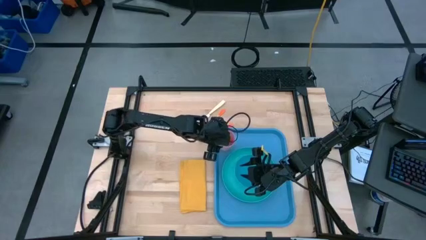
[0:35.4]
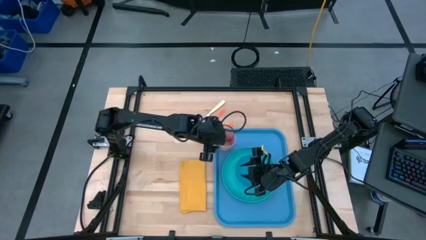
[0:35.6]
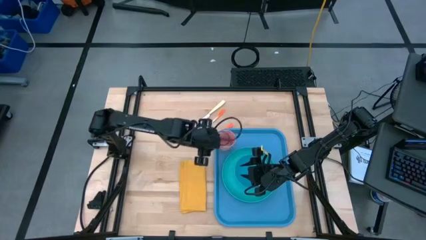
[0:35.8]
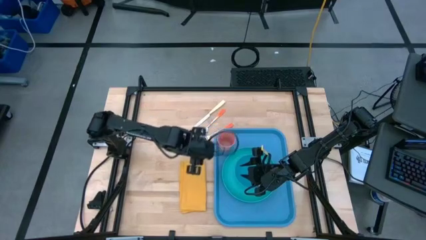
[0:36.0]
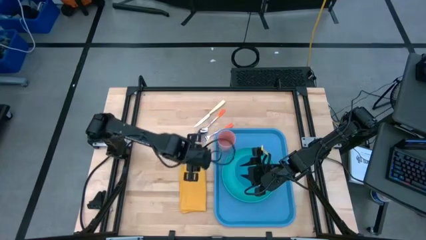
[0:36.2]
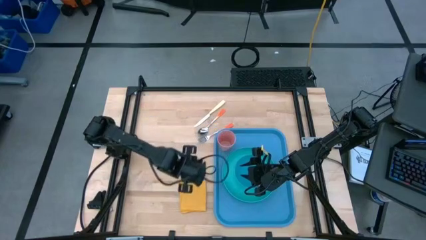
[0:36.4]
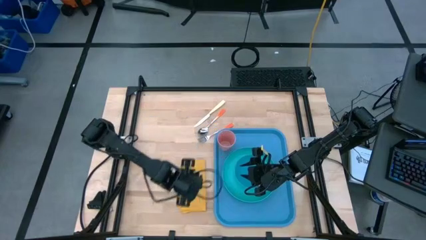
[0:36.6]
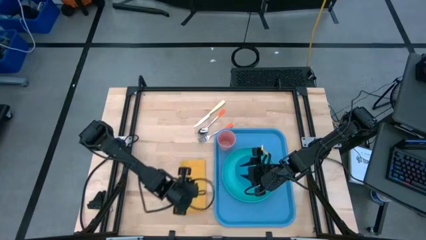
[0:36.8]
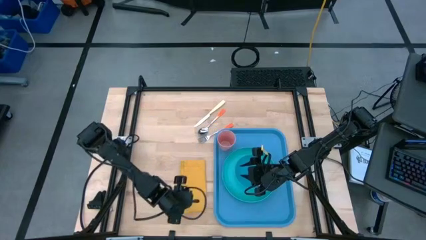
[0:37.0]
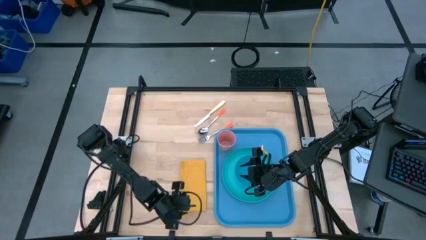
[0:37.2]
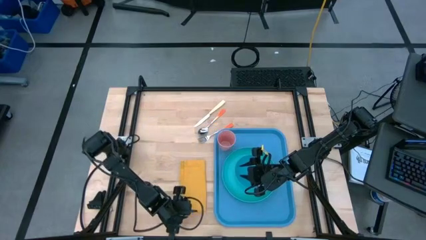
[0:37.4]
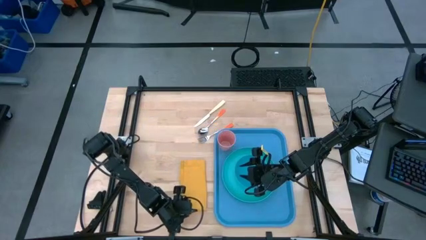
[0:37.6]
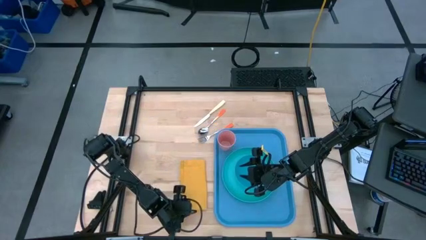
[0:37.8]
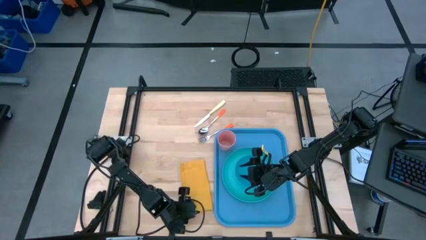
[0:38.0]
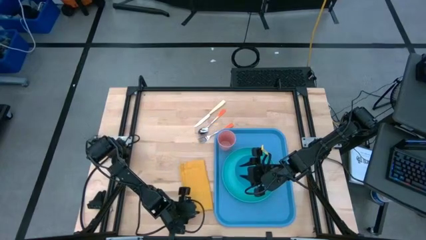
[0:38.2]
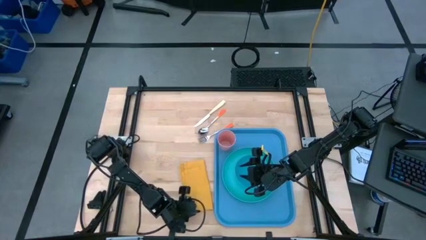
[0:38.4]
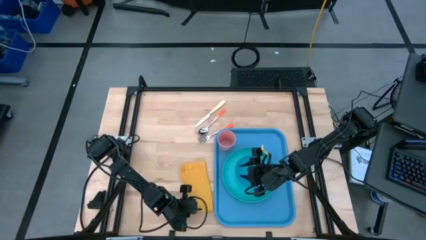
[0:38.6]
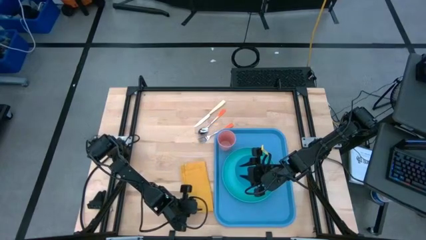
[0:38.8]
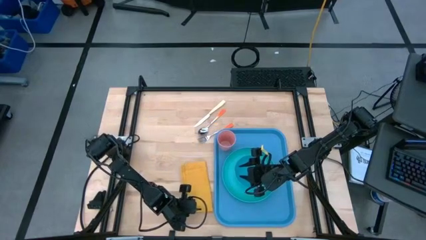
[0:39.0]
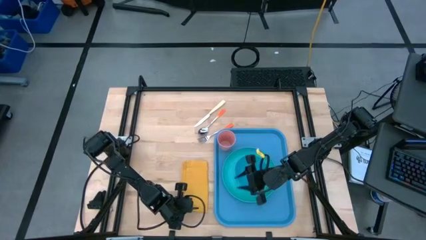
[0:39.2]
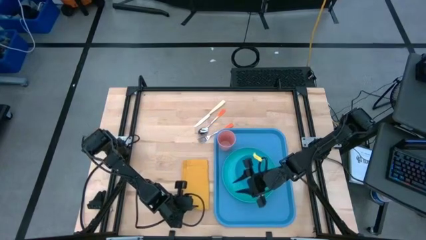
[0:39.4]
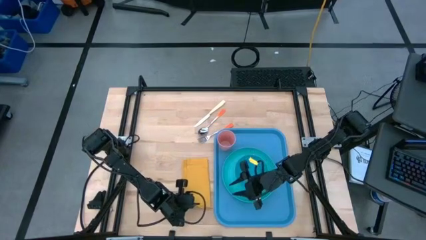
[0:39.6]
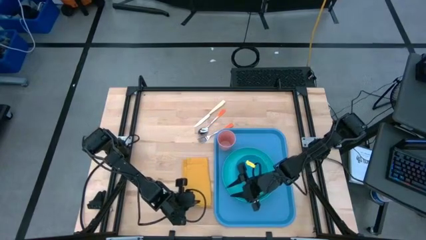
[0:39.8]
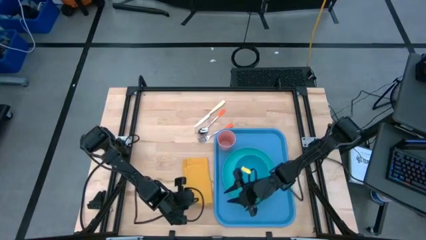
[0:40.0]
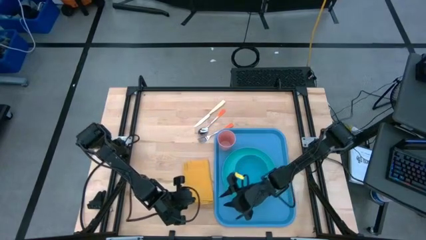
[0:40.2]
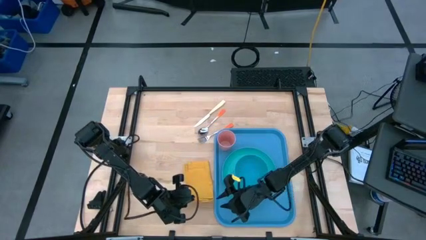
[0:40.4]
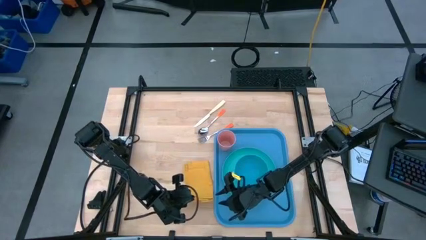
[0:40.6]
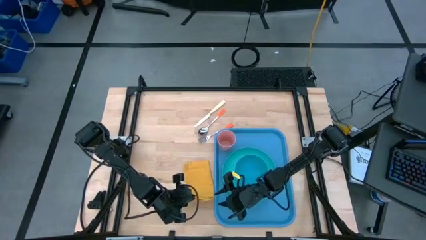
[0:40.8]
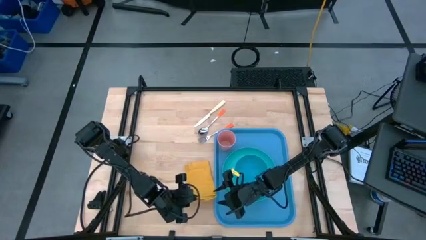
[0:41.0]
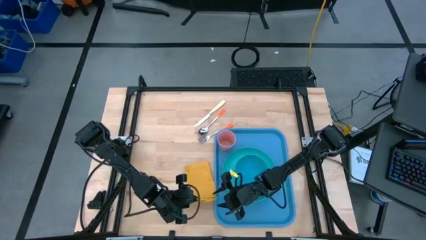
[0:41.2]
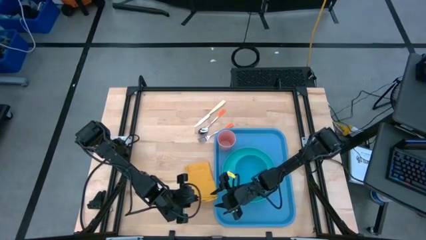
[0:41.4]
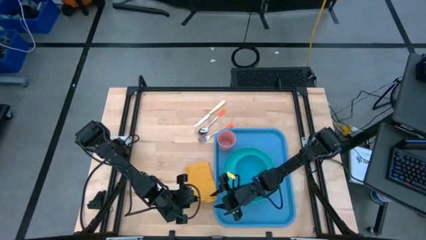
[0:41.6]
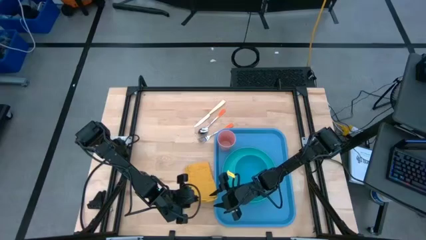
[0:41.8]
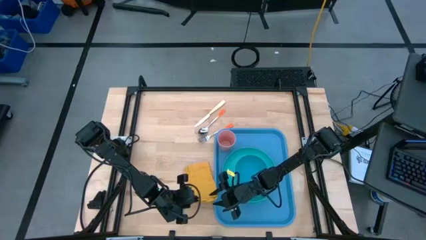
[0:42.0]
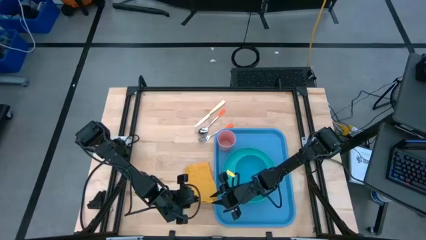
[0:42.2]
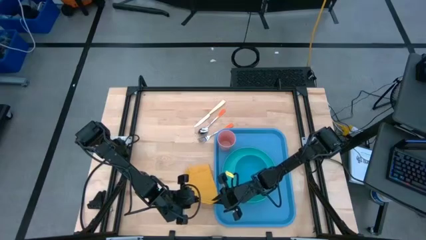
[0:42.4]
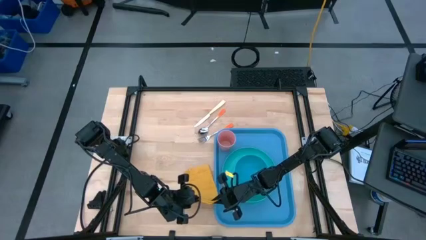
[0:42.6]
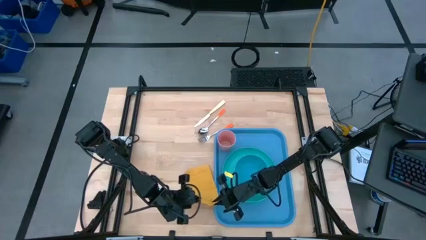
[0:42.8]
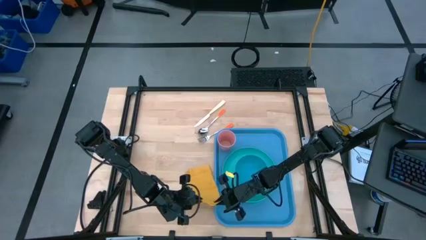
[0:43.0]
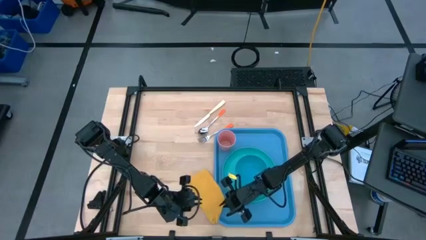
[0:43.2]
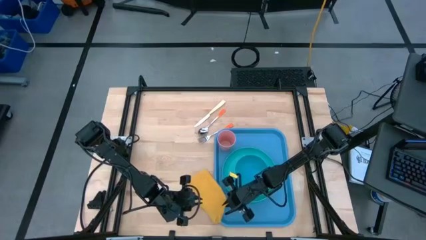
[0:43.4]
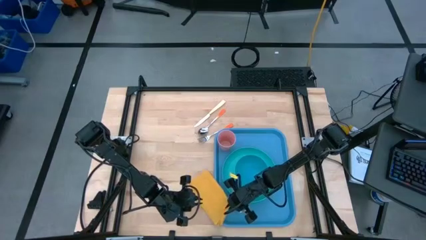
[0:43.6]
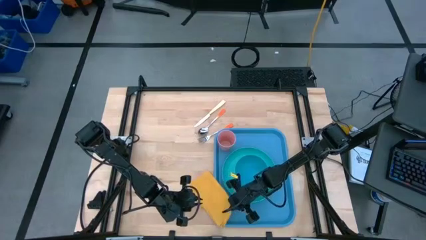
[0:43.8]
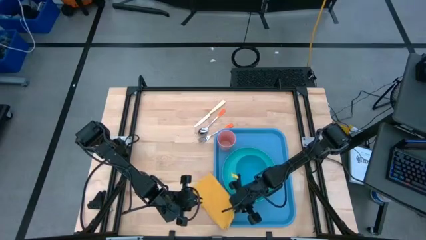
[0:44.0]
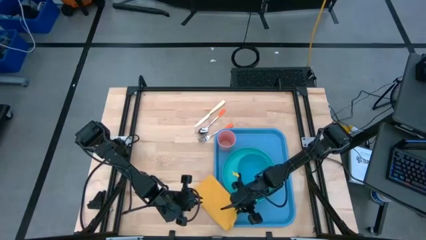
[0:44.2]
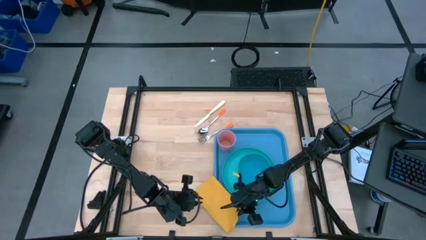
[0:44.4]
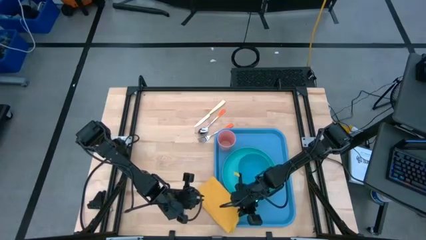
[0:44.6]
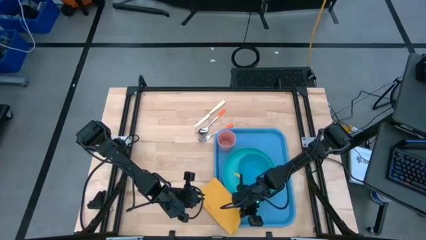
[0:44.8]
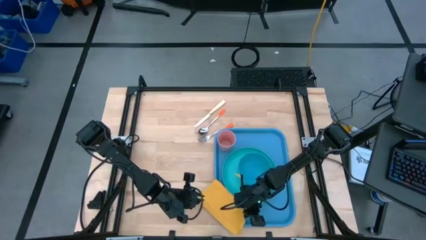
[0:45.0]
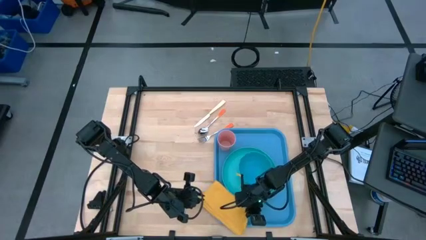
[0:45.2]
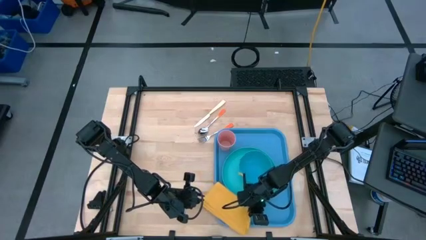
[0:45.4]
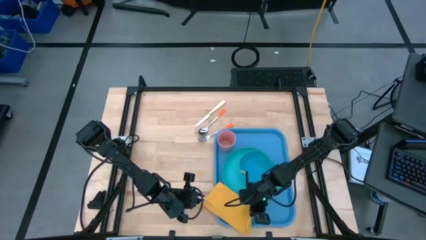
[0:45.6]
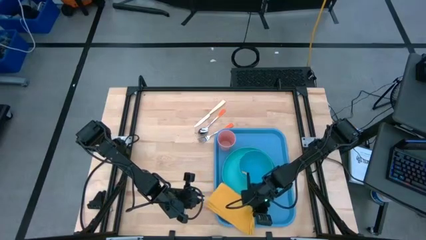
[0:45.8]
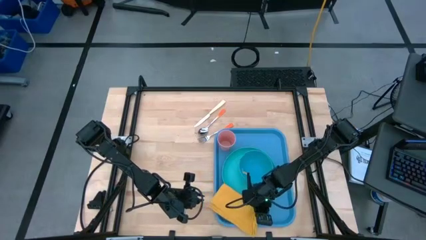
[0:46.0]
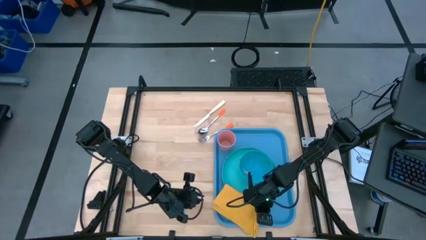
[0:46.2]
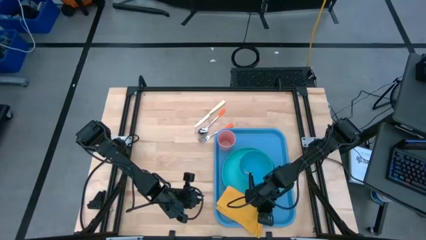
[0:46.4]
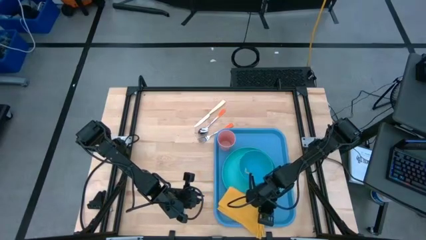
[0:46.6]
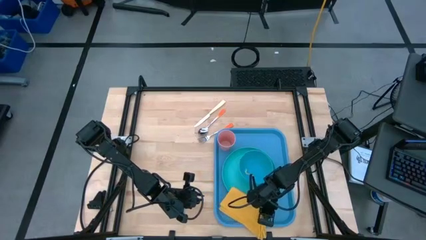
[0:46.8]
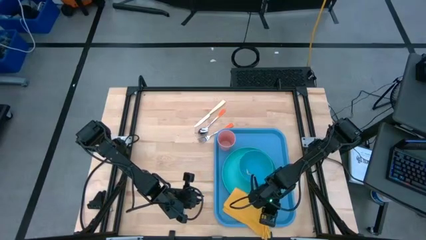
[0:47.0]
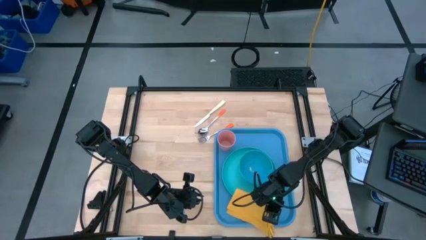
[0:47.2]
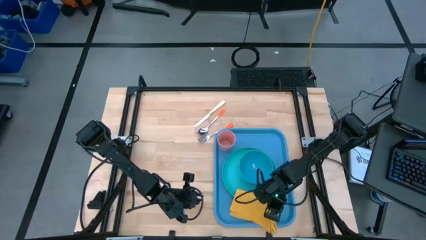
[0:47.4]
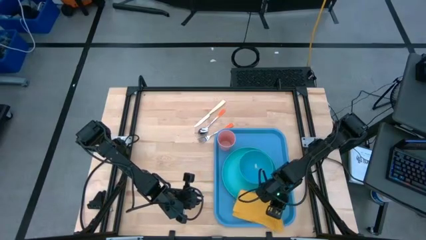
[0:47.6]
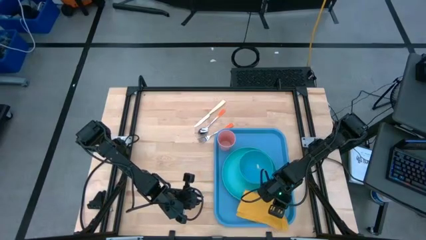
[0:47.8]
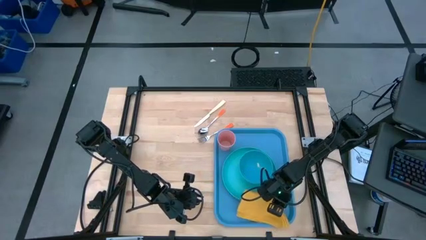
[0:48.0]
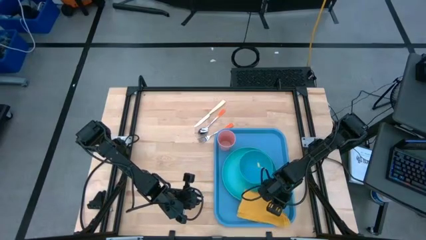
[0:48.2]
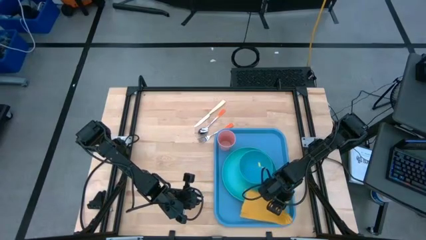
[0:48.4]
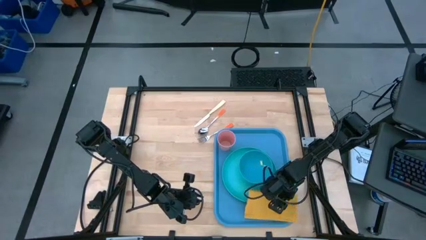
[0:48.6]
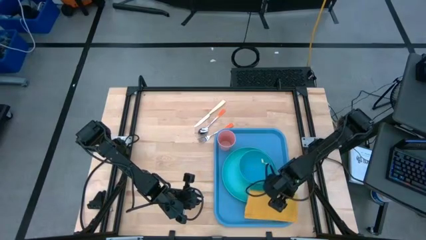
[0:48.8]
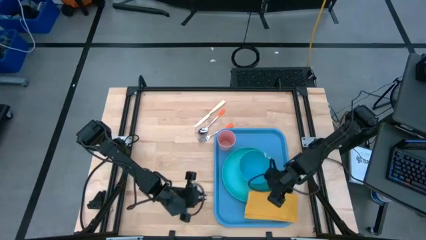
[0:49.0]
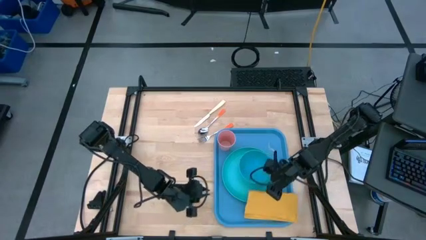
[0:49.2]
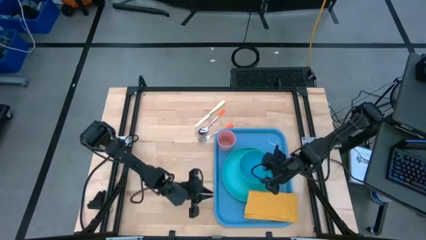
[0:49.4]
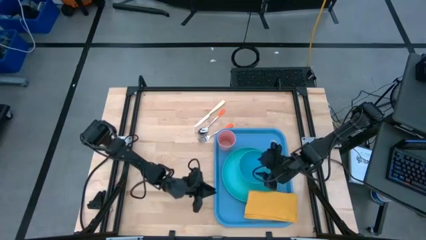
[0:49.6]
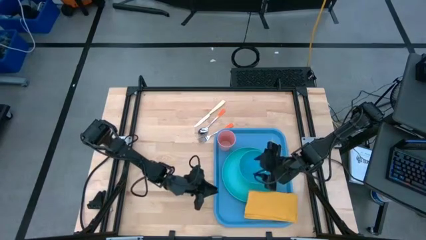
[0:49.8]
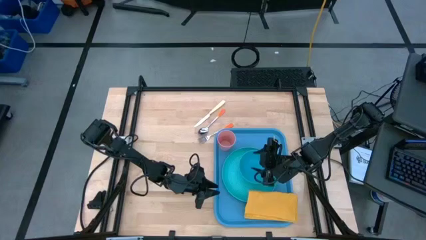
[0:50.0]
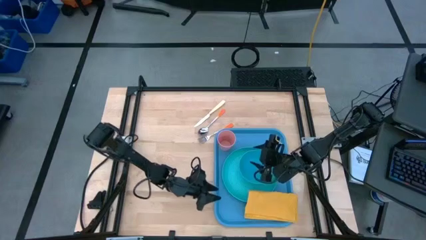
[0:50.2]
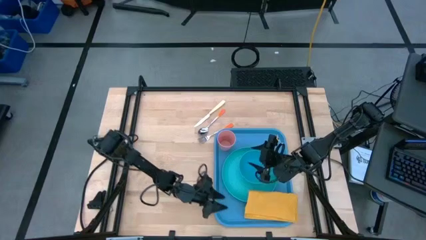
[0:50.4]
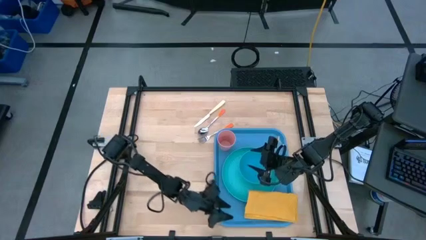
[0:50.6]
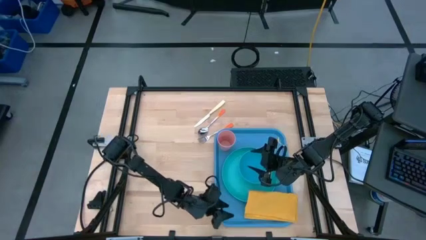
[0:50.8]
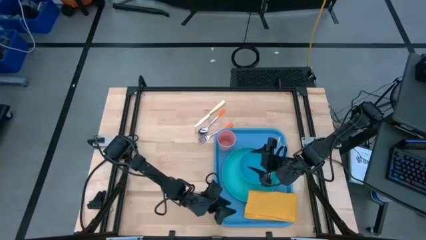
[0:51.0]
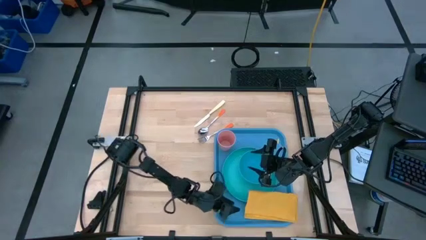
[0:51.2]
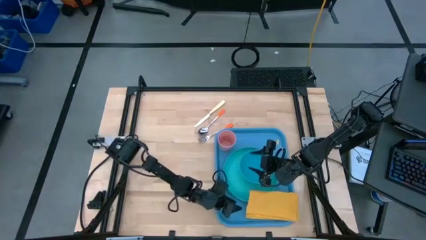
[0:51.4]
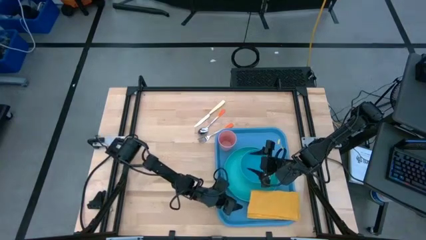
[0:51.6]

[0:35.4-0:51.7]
Task: Set up tray
Put the yellow table napkin on the blue tray to the bottom of the light blue plate
